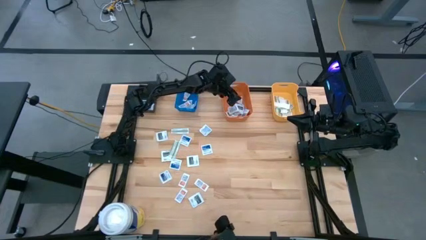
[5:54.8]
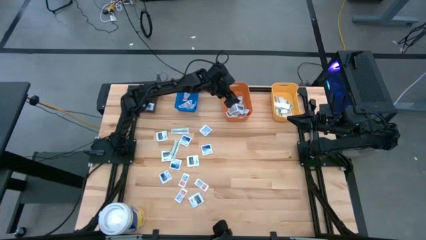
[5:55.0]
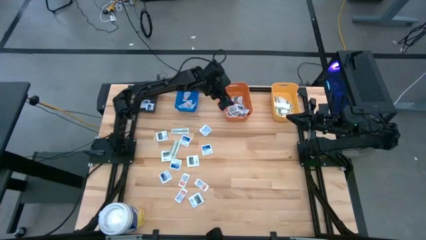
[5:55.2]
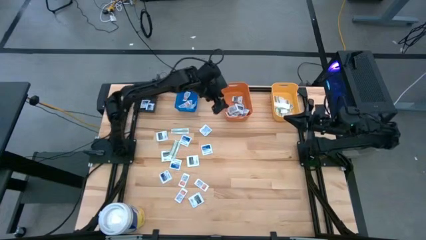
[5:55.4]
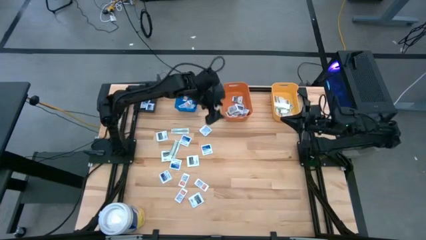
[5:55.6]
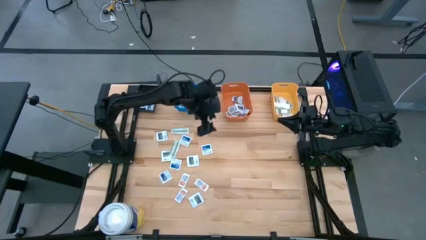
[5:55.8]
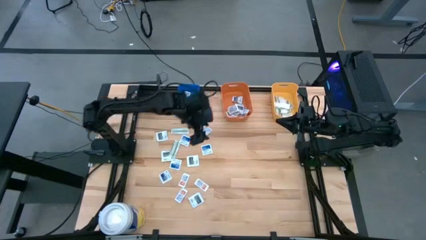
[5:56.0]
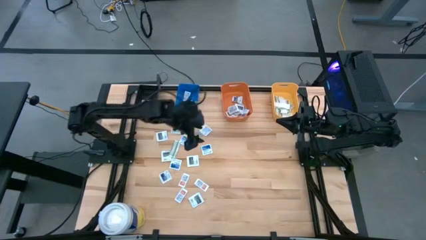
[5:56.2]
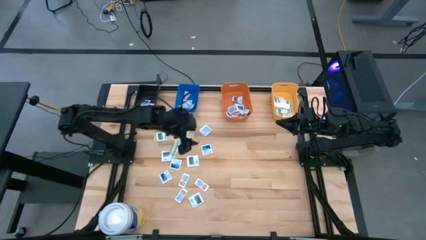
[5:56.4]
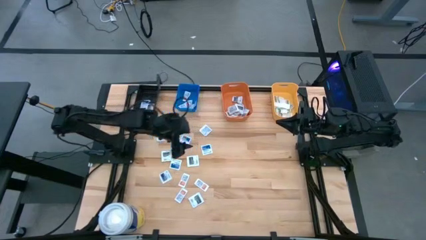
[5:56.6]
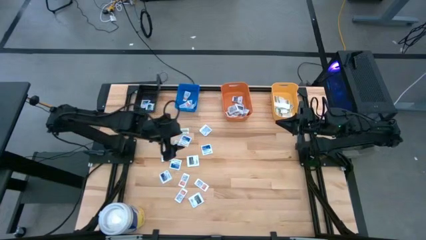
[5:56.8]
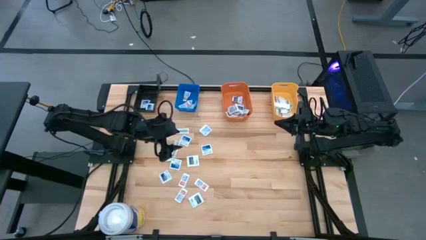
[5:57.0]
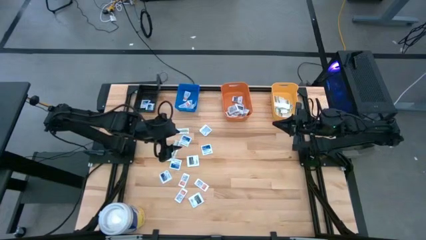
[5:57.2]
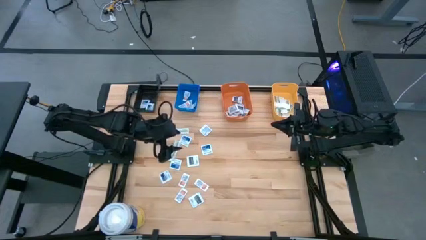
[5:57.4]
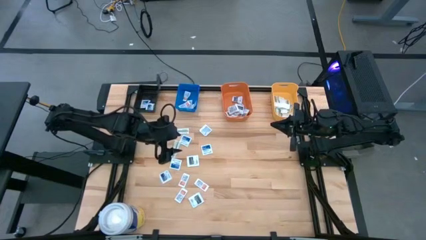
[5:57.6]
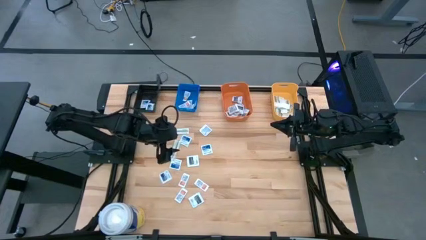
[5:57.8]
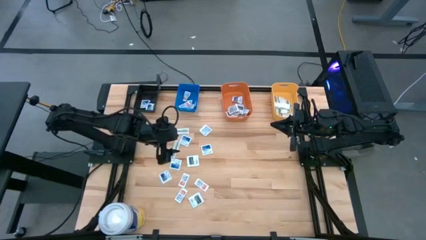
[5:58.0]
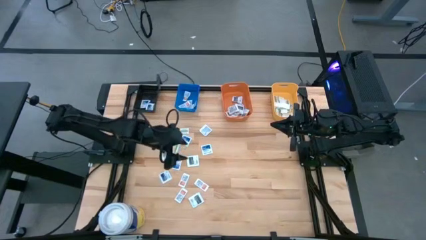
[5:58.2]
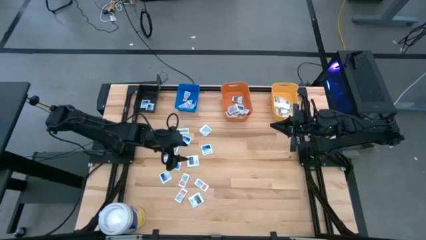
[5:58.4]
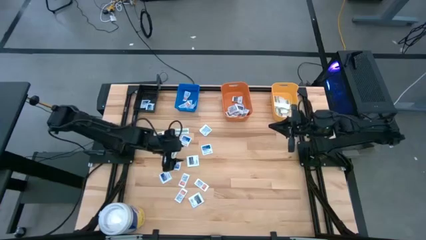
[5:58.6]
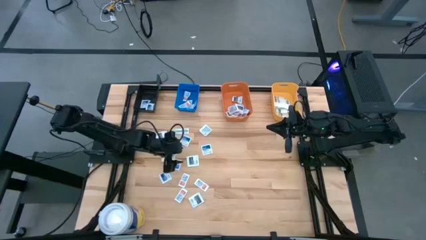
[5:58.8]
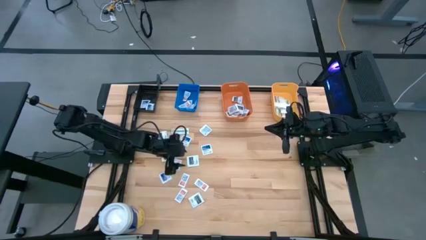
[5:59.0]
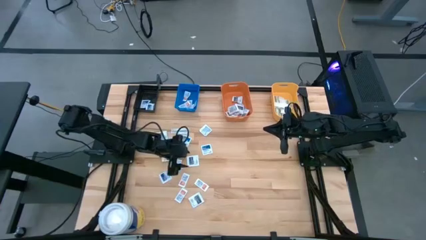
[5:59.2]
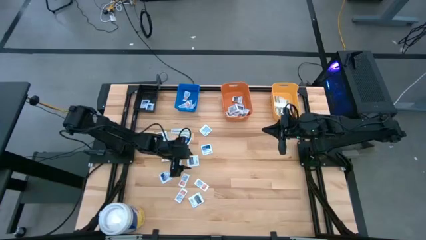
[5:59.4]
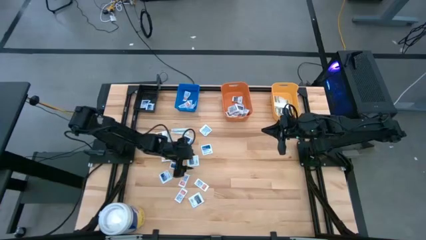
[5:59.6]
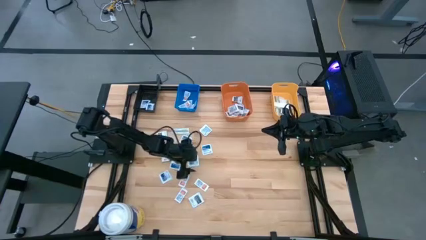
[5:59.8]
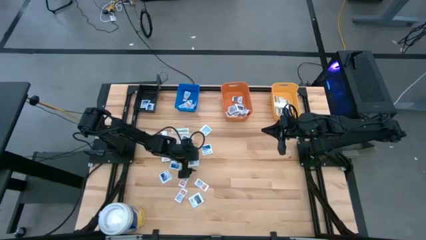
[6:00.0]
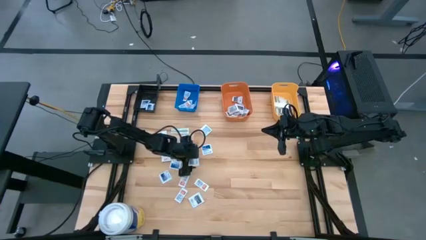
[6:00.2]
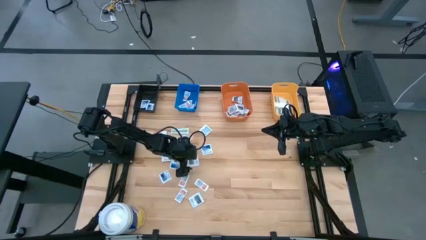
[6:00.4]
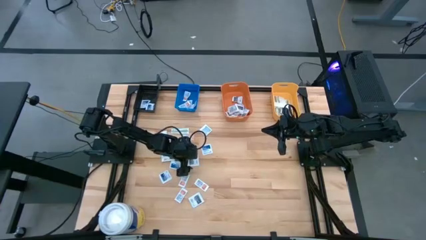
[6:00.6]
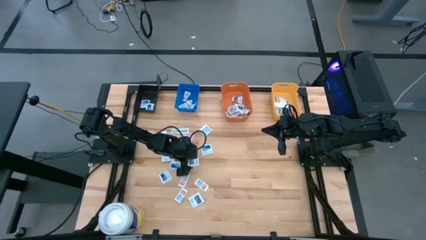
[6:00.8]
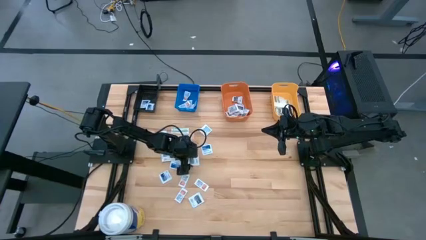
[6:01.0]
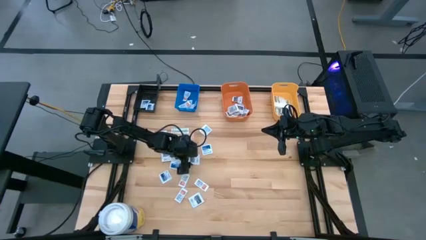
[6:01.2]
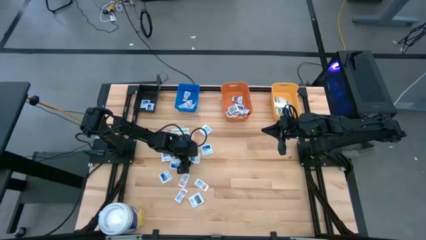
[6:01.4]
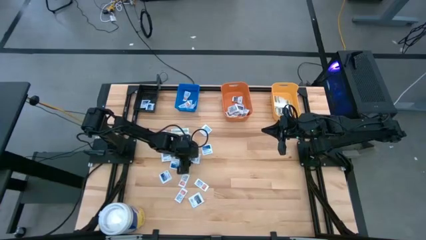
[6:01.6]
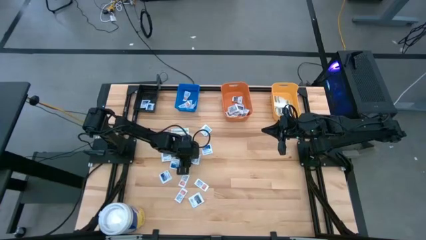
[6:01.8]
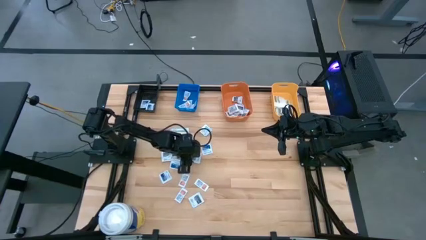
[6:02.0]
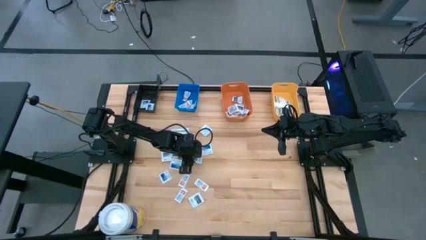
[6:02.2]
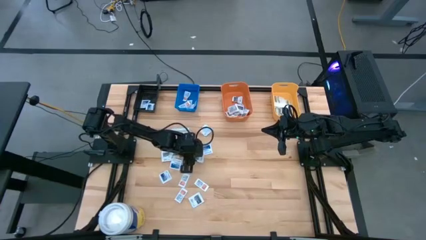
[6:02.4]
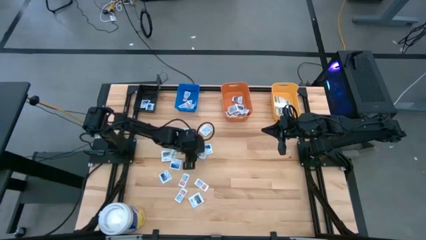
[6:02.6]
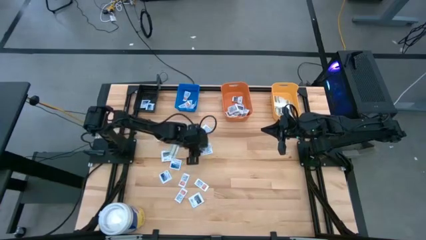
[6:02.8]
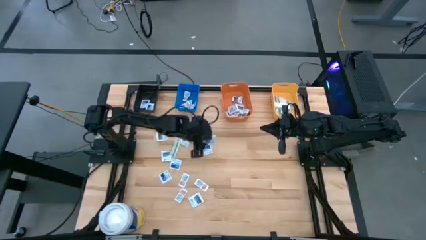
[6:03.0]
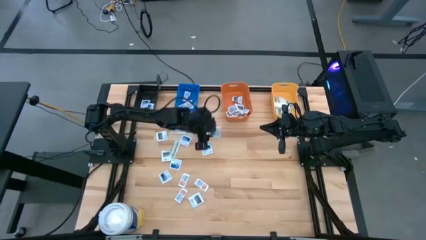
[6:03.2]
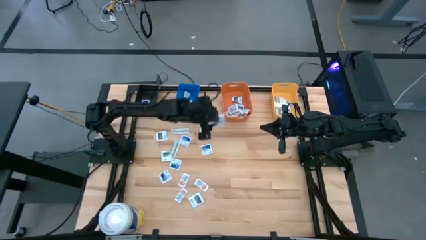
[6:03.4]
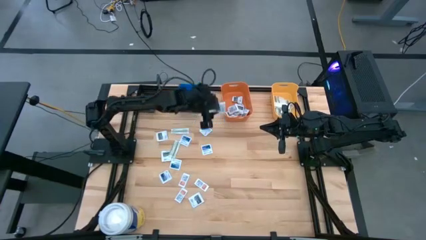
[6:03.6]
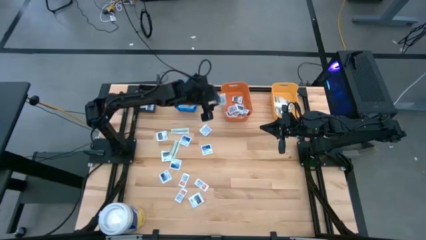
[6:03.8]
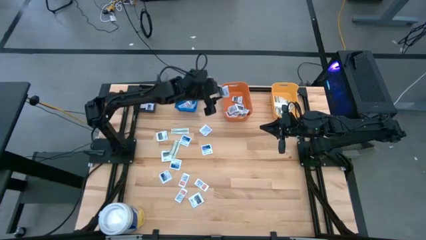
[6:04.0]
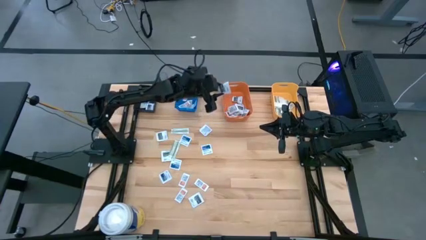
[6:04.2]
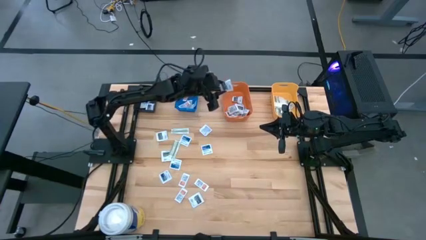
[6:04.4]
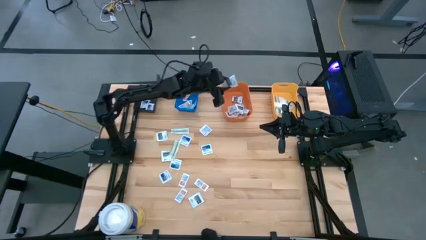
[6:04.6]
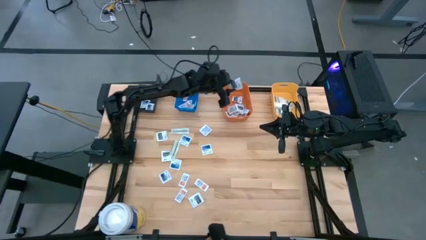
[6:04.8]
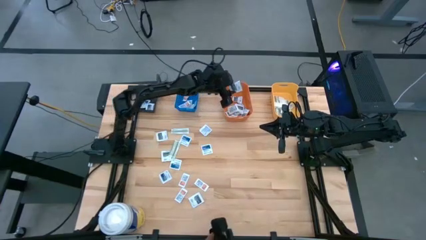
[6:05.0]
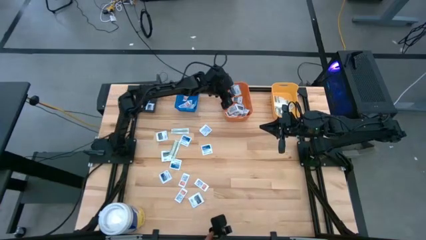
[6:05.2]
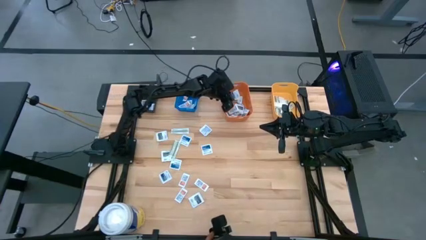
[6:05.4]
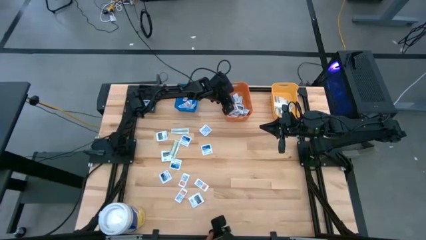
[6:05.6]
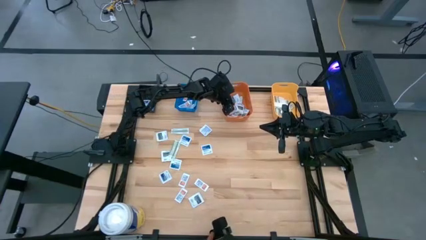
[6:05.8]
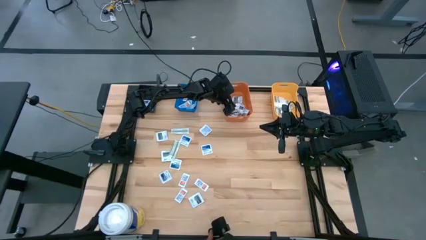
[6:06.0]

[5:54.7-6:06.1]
Task: Pick & Place First Aid Supplies
Put the towelette pack into the orange bin

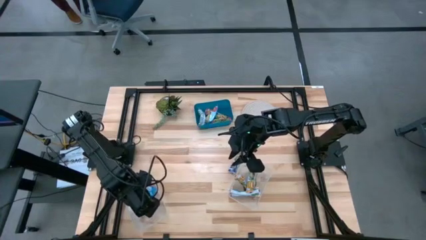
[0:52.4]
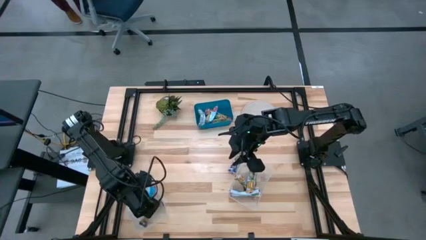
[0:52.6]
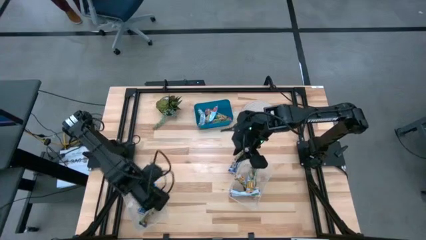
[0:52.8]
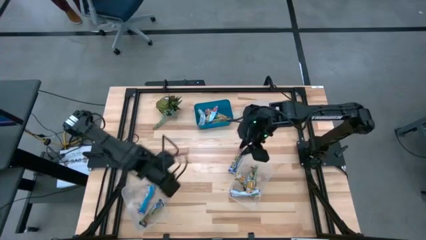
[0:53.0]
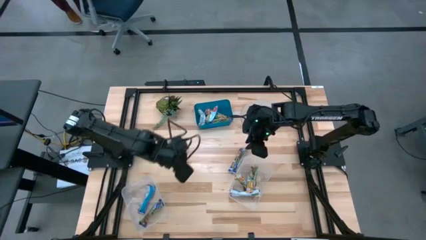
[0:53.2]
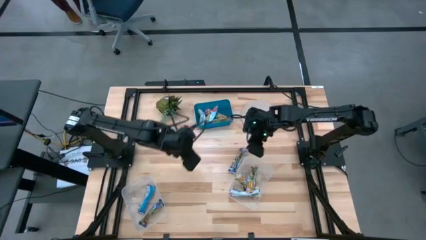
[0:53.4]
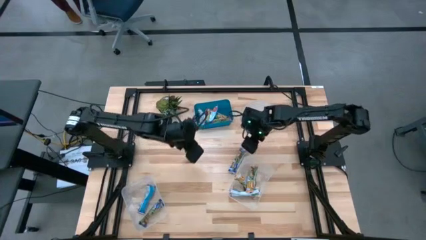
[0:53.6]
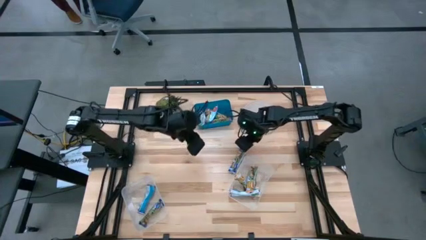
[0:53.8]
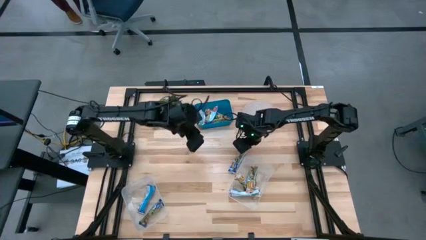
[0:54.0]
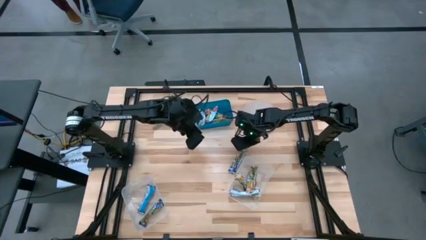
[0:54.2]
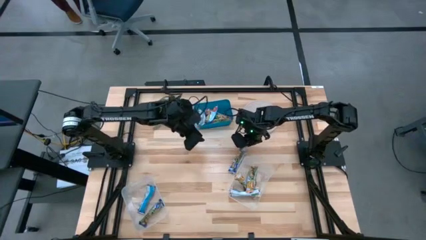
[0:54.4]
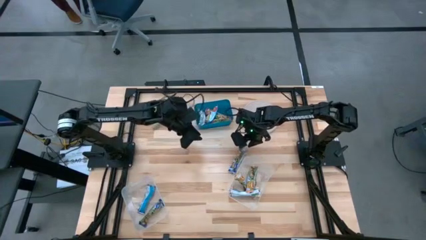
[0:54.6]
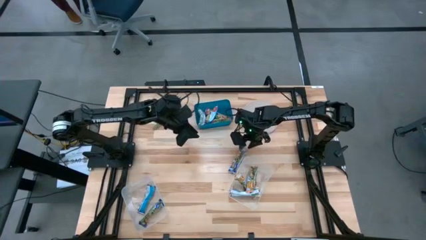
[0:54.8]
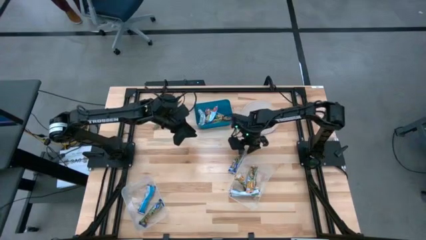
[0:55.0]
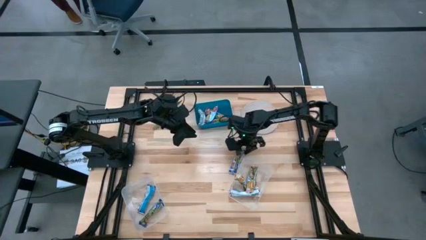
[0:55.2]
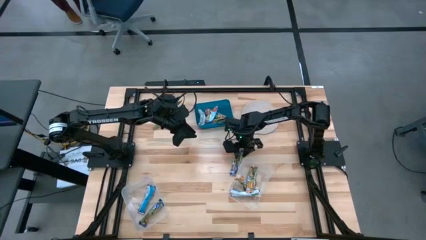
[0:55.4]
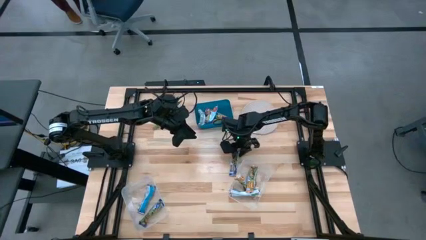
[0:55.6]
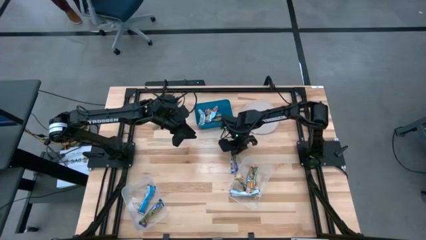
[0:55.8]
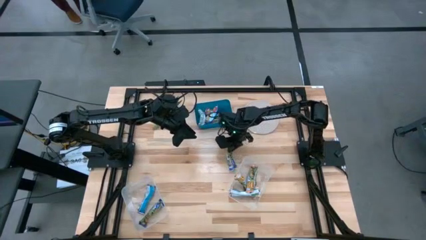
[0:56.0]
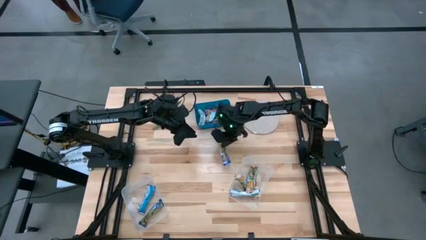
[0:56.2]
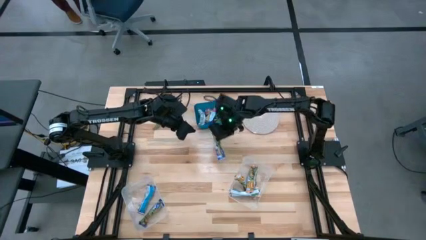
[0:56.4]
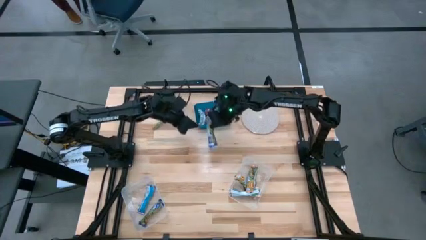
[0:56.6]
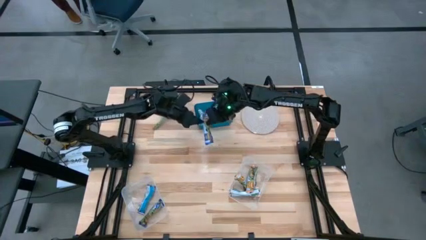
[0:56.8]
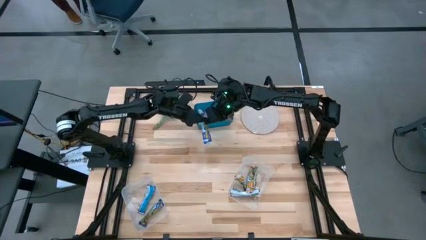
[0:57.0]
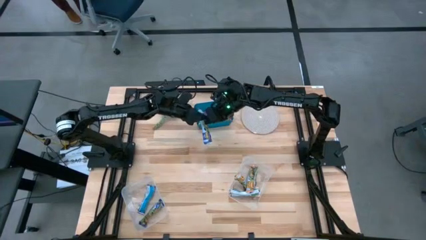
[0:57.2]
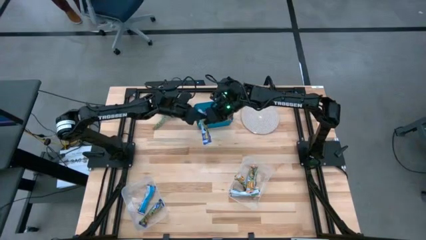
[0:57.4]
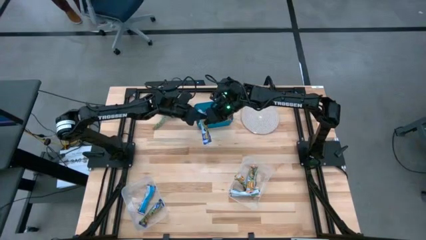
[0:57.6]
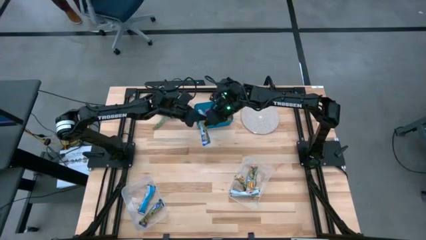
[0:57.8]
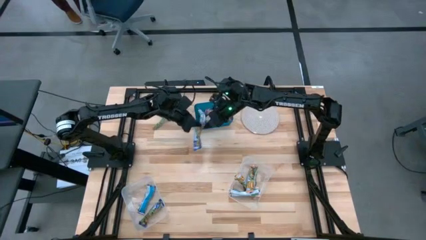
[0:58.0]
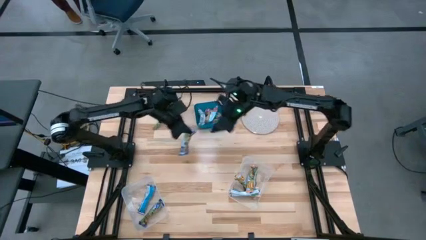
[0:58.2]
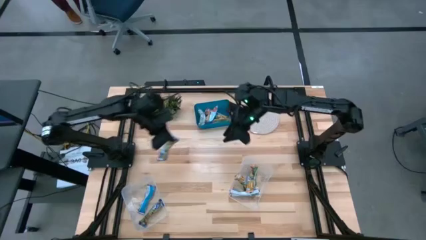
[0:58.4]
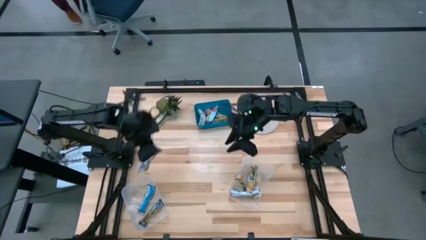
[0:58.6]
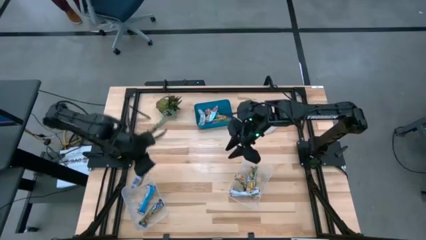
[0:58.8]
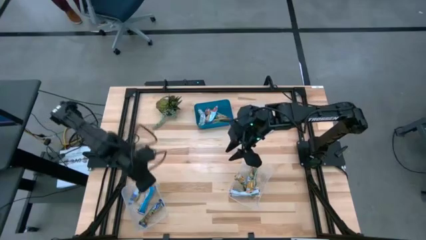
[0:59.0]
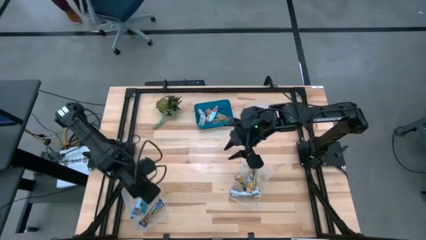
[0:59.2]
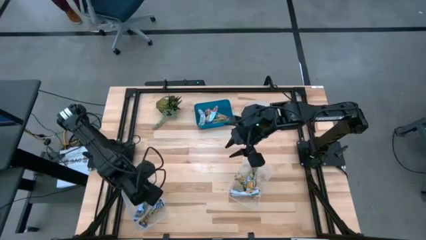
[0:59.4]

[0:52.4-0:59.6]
Task: Pick and place Granola Bars by type
Put the blue granola bar into the left transparent bin
